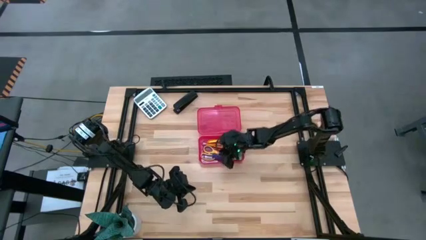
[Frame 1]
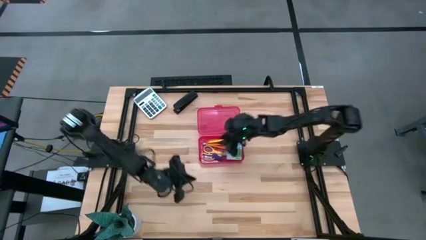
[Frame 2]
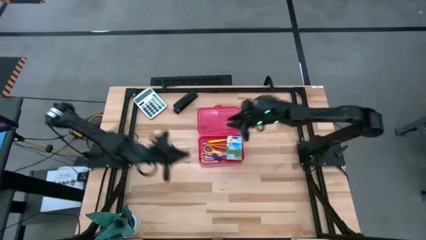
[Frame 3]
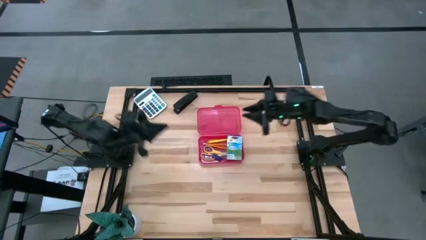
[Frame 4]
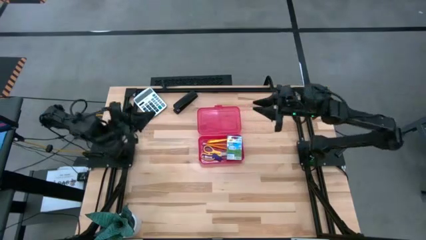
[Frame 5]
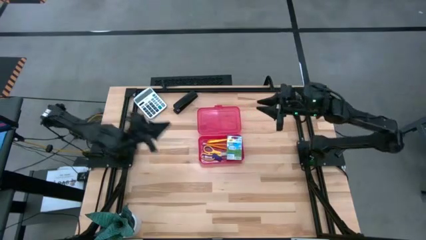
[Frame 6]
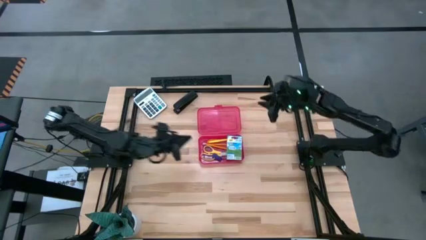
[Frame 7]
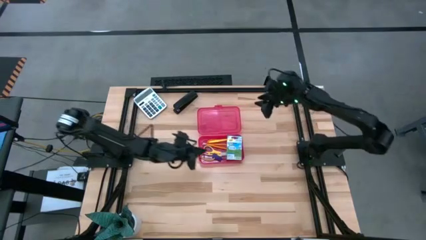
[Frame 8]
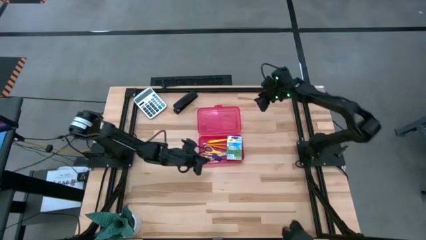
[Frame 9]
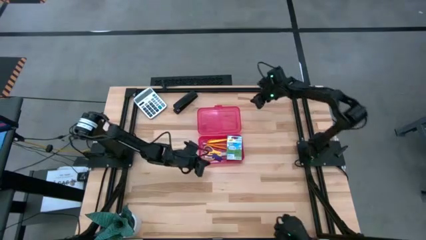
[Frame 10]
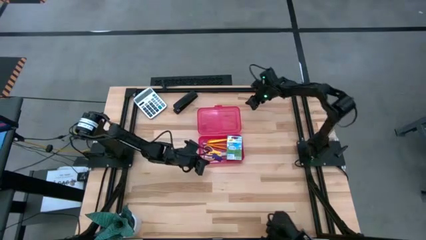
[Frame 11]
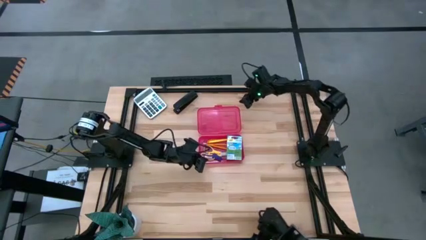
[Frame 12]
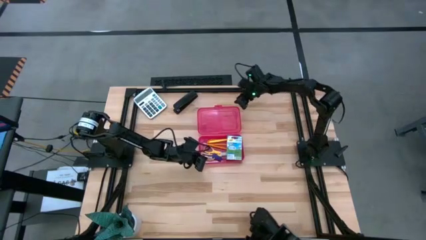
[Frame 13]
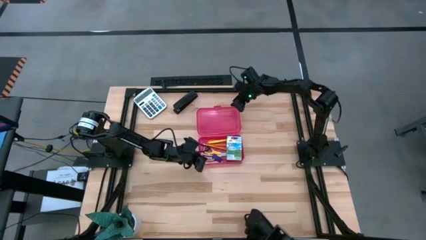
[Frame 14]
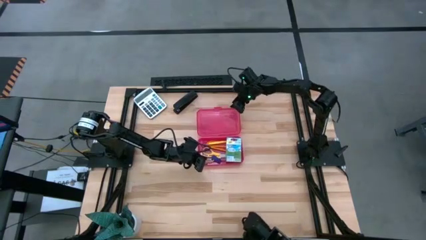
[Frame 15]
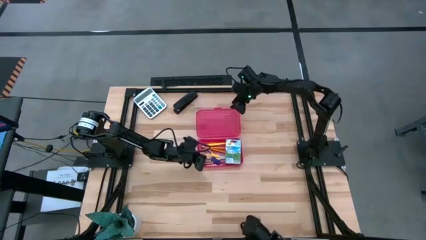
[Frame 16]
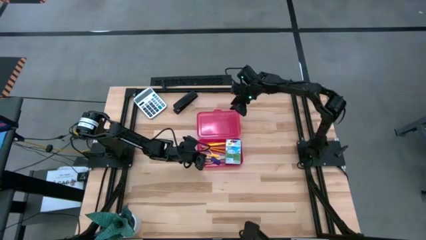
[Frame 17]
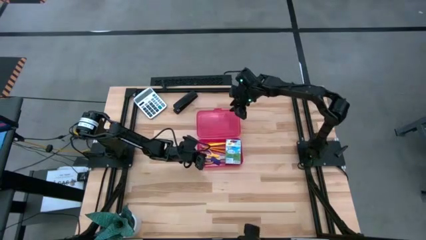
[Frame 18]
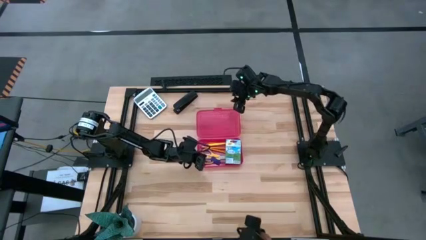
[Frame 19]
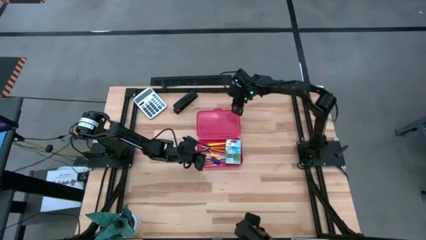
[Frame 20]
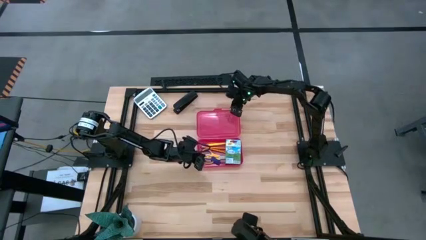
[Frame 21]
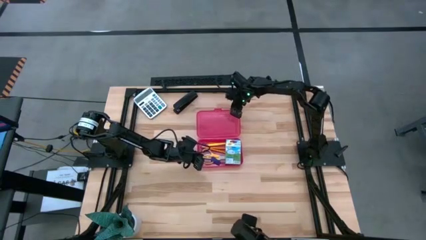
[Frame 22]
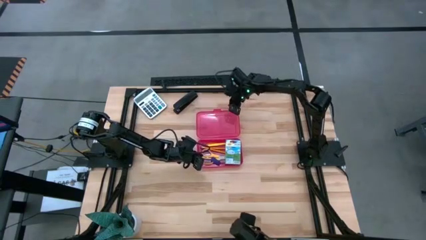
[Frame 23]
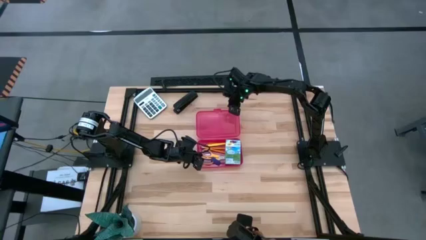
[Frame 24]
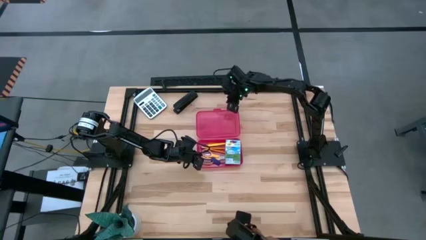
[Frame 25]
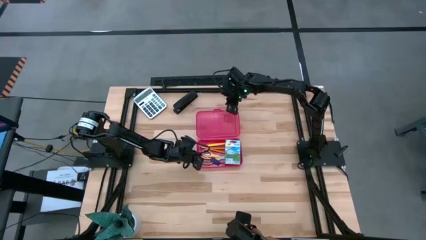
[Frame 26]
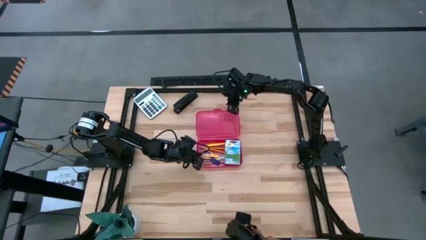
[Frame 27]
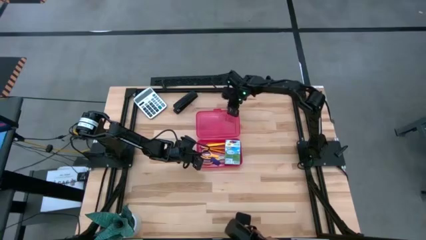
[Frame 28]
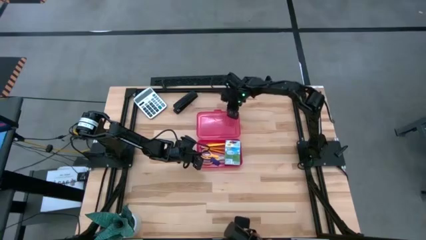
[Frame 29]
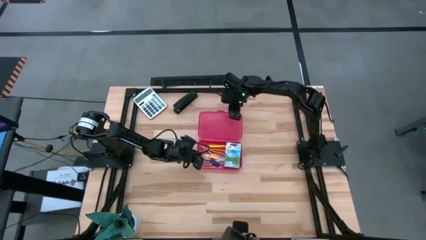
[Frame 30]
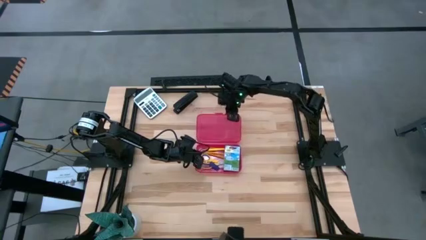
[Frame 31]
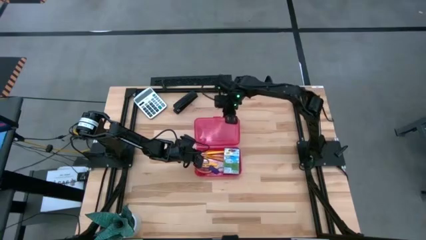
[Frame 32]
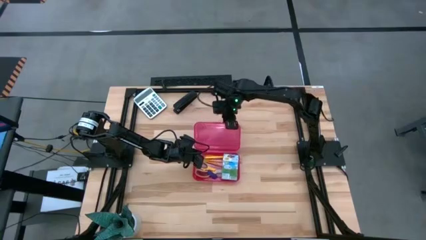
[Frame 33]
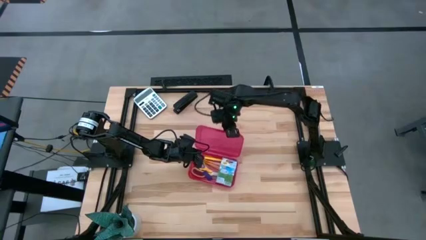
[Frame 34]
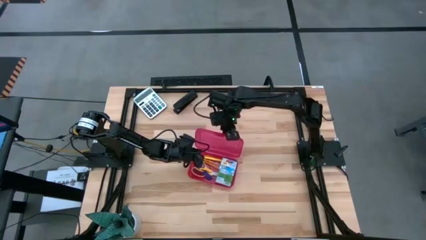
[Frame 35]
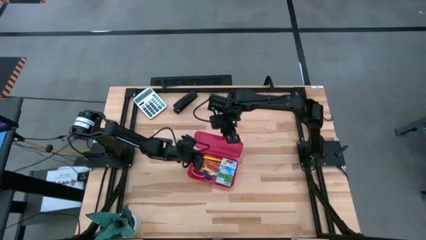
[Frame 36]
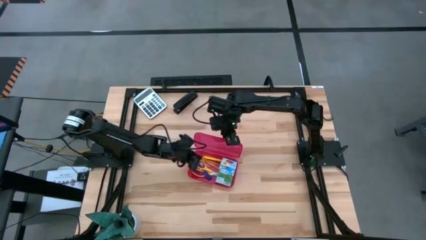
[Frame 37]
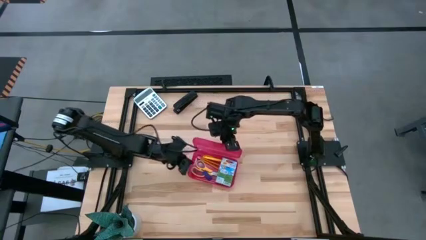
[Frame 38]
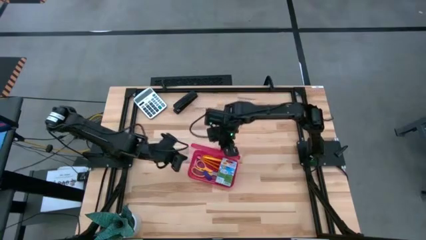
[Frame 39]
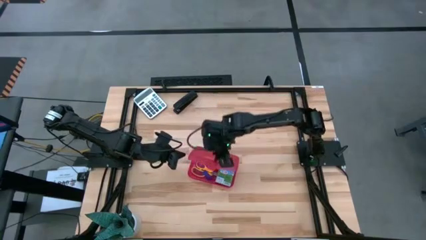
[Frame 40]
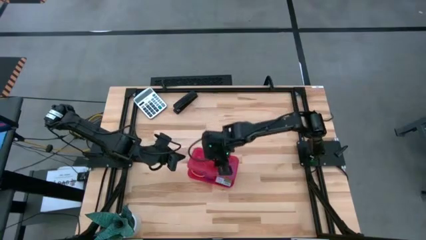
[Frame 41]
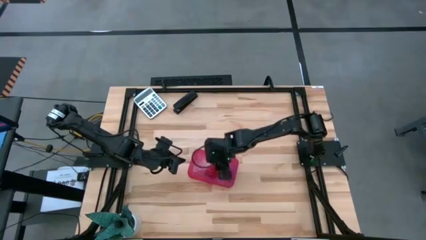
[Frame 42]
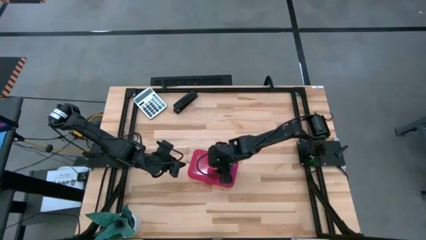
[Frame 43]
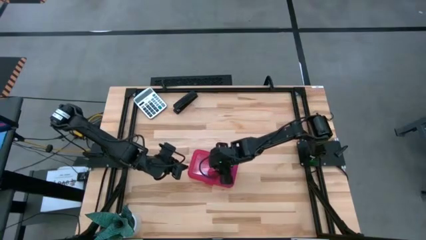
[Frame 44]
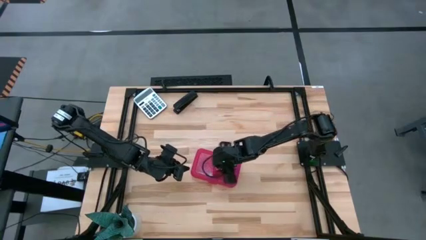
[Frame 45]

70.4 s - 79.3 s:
Task: Pack school essentials
Close the red supply box

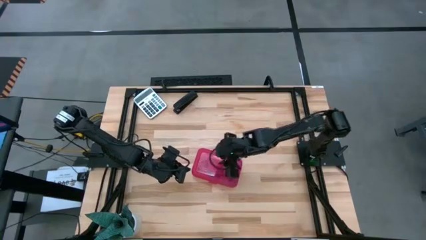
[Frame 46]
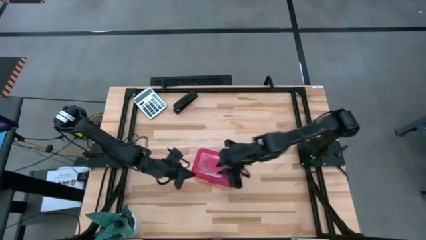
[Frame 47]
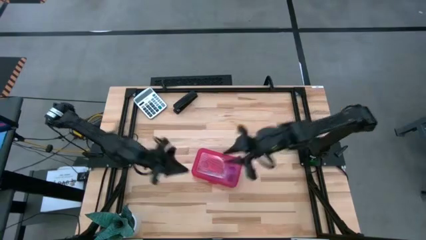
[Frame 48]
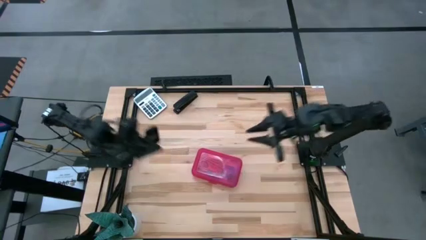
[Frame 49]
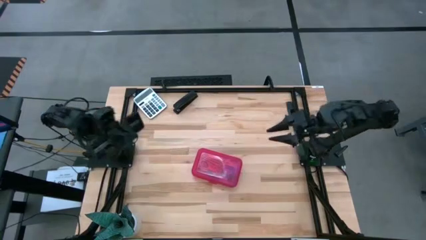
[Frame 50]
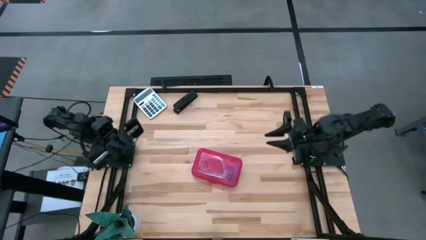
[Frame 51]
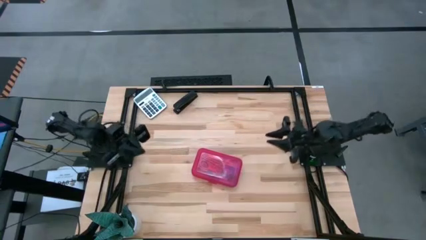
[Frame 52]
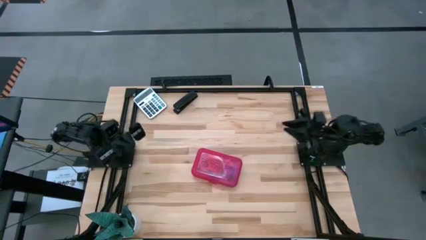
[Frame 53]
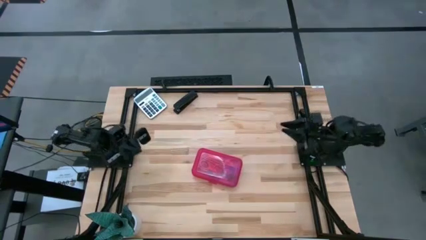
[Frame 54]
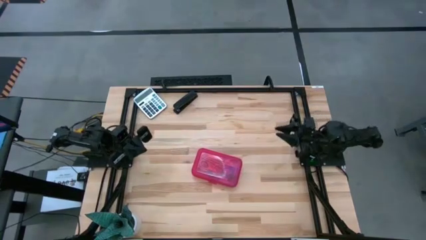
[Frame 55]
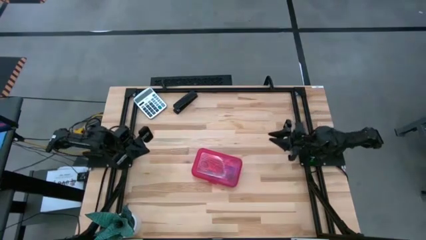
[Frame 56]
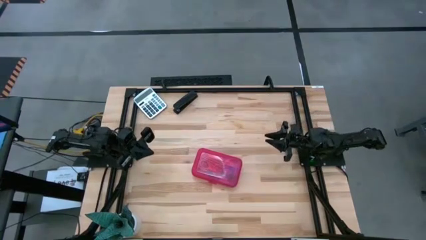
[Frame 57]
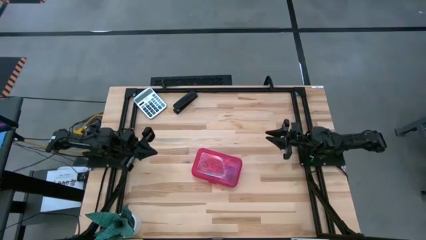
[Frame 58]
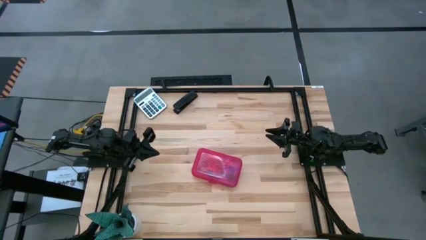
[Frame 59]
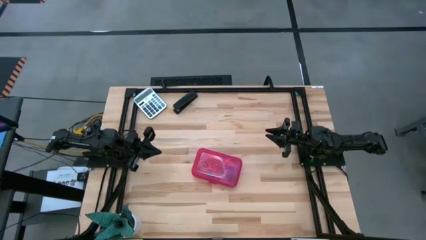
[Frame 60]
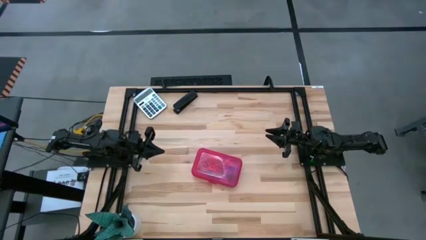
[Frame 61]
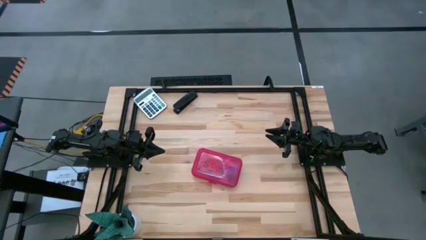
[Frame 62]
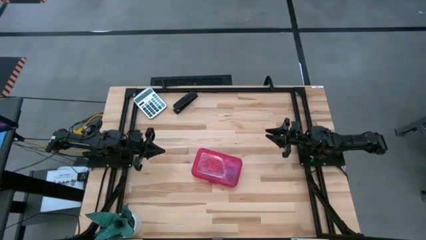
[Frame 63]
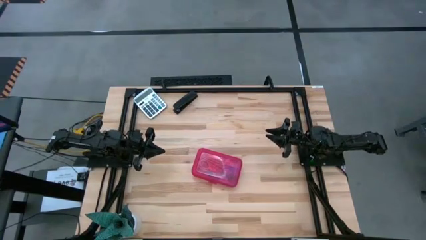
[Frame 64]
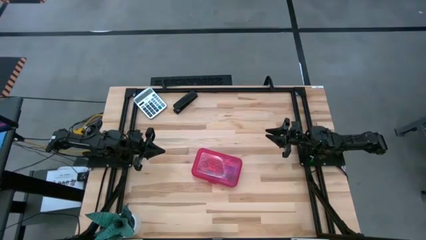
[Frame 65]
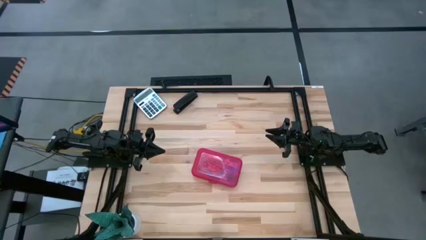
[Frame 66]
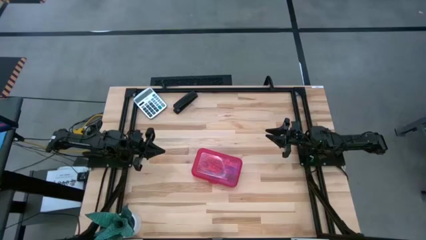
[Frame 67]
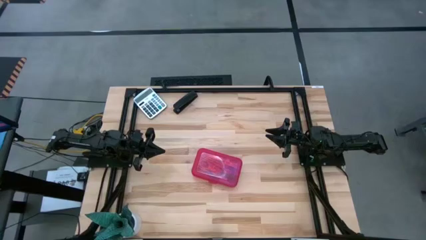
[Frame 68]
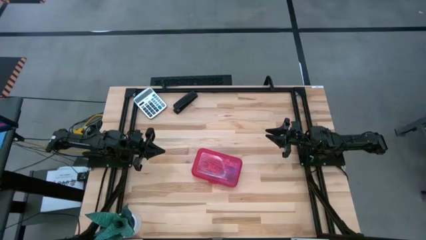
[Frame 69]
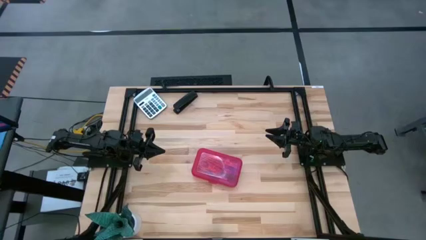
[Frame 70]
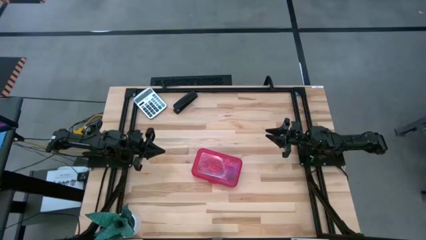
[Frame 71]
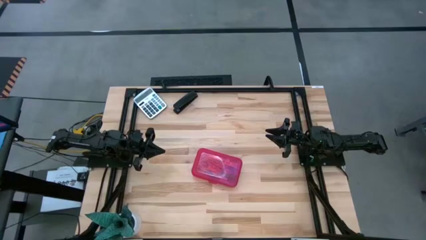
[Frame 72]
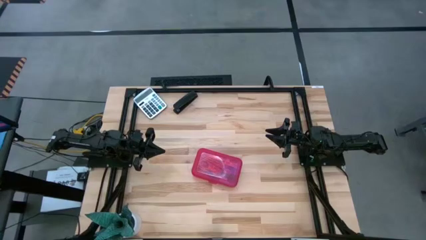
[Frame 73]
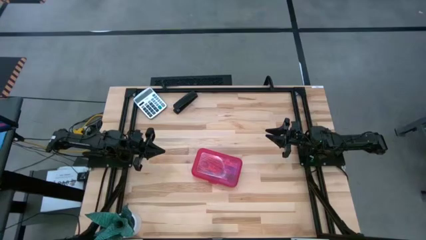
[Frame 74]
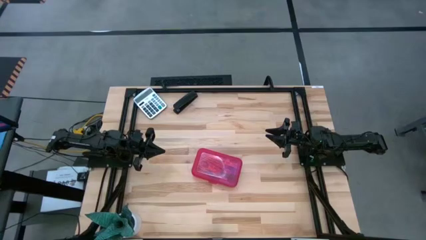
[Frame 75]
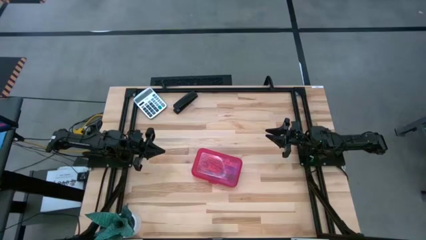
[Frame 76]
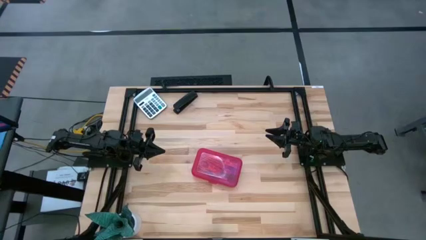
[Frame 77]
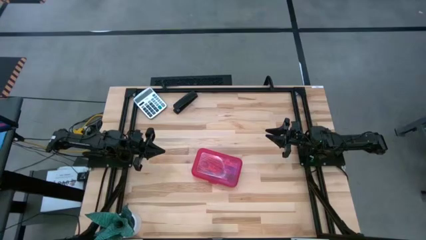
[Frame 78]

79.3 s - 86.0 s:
Return to Home Position
